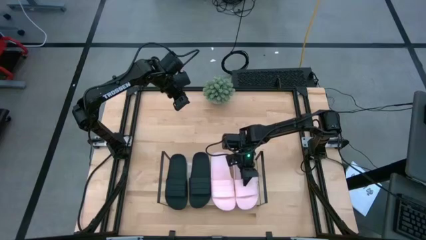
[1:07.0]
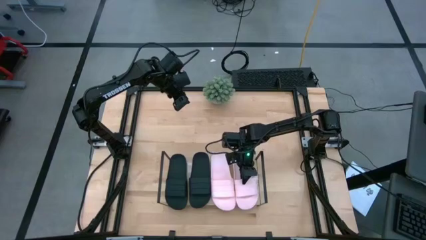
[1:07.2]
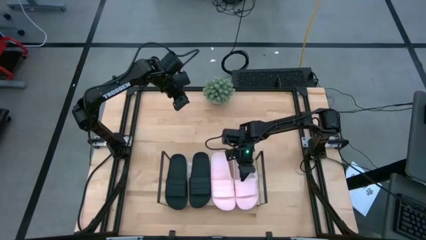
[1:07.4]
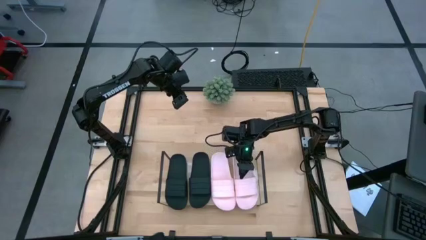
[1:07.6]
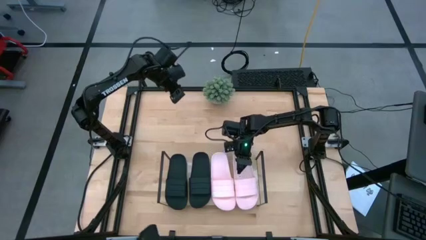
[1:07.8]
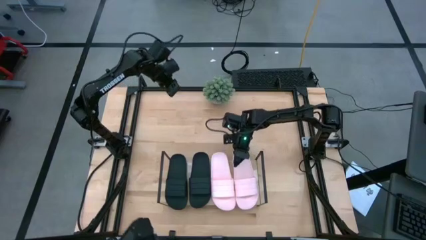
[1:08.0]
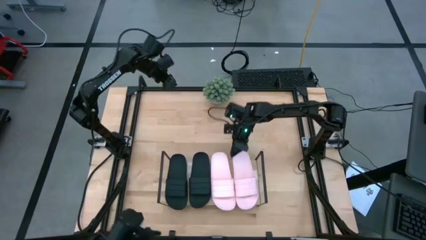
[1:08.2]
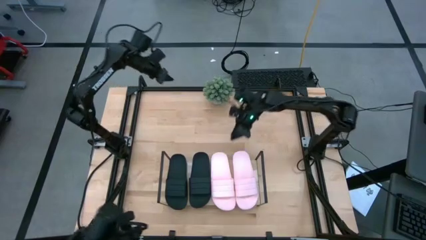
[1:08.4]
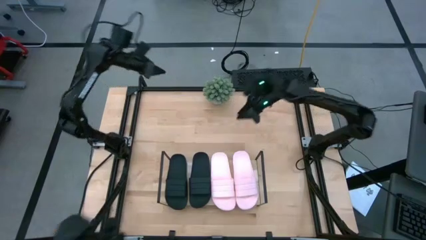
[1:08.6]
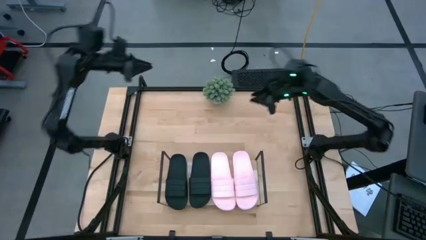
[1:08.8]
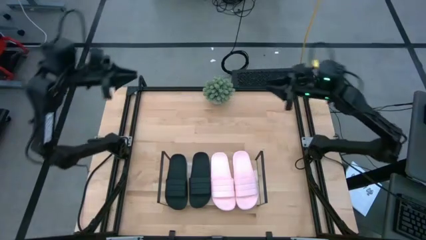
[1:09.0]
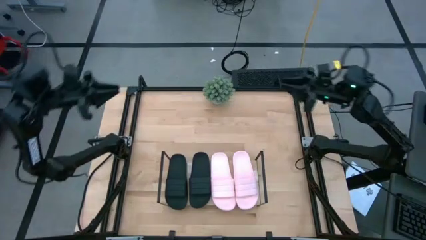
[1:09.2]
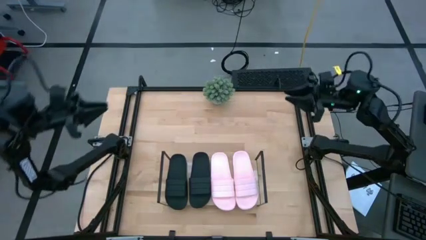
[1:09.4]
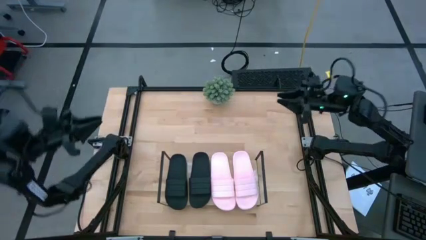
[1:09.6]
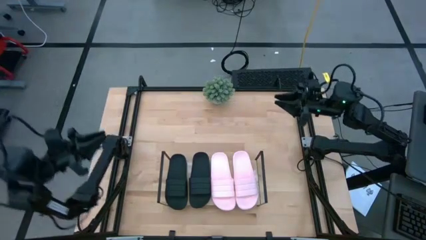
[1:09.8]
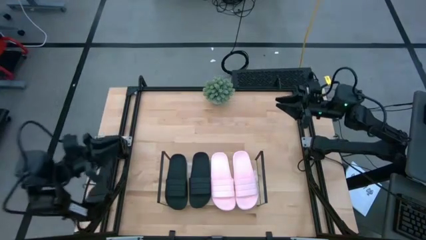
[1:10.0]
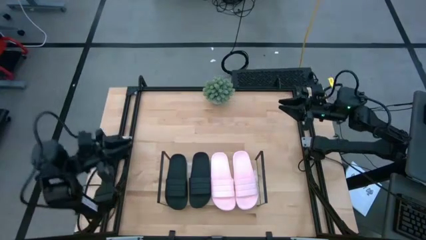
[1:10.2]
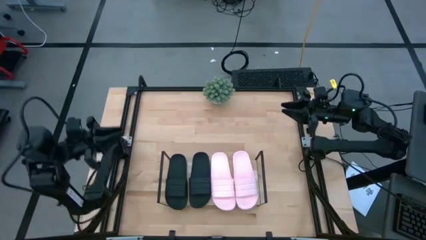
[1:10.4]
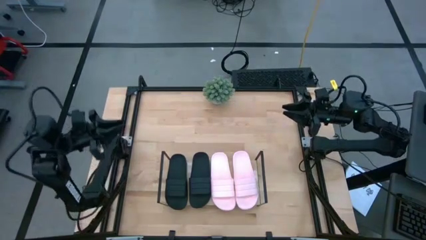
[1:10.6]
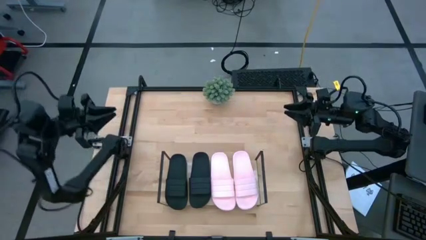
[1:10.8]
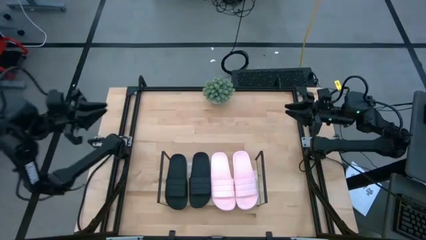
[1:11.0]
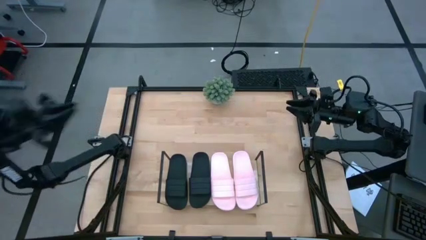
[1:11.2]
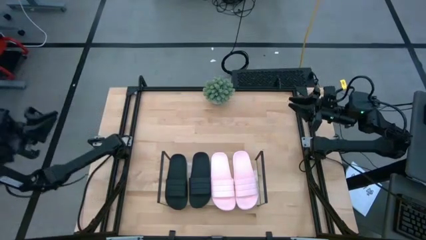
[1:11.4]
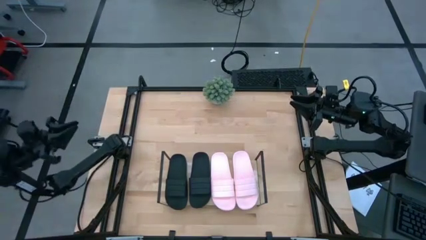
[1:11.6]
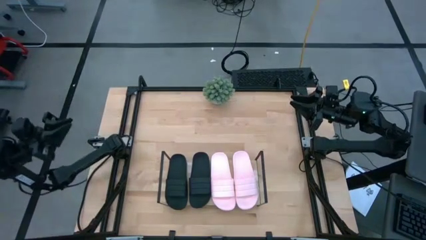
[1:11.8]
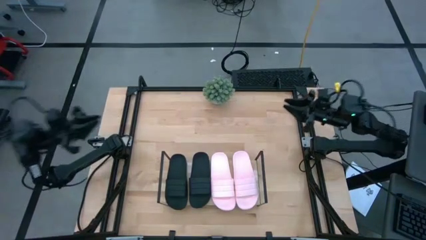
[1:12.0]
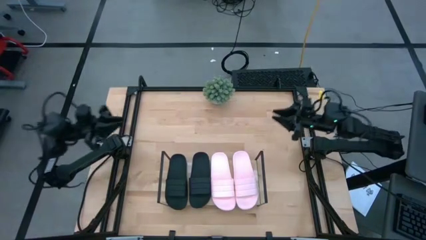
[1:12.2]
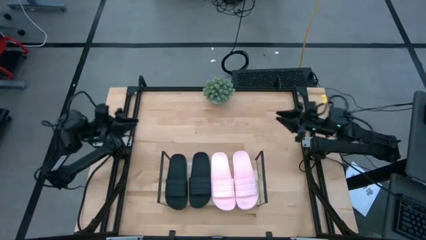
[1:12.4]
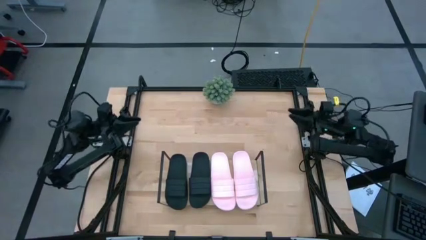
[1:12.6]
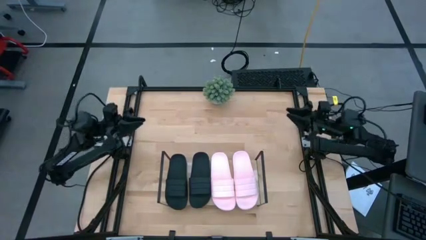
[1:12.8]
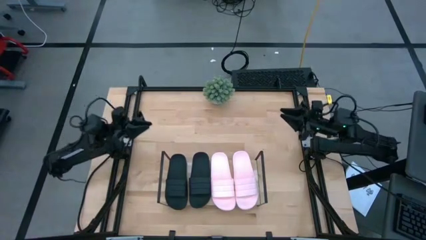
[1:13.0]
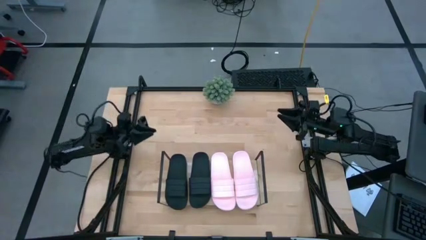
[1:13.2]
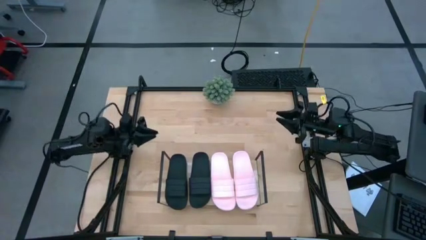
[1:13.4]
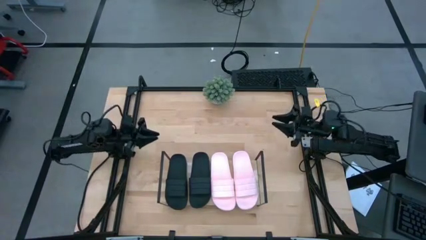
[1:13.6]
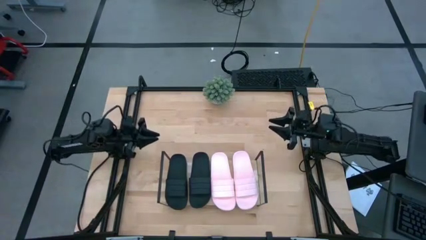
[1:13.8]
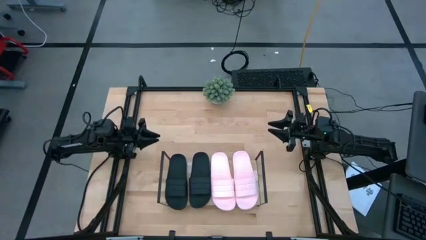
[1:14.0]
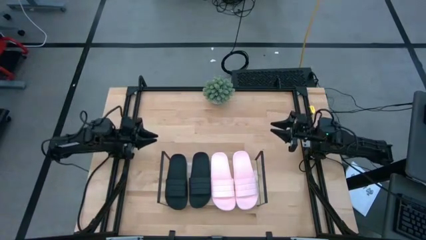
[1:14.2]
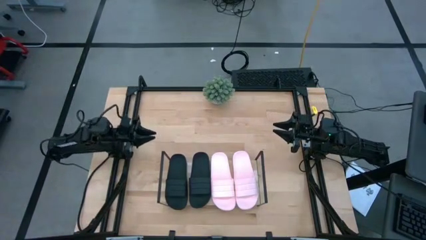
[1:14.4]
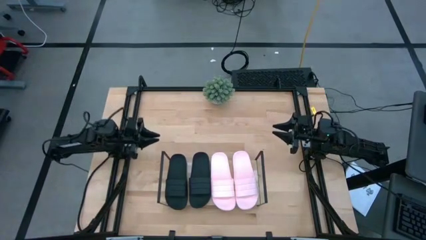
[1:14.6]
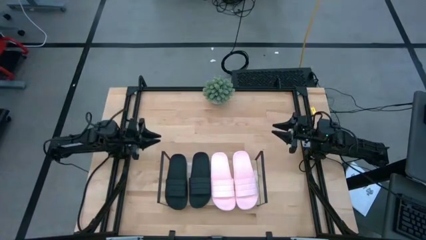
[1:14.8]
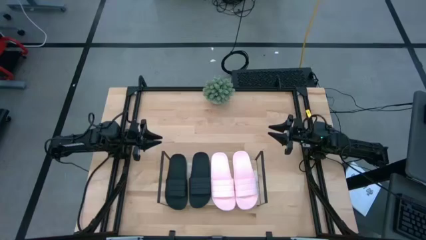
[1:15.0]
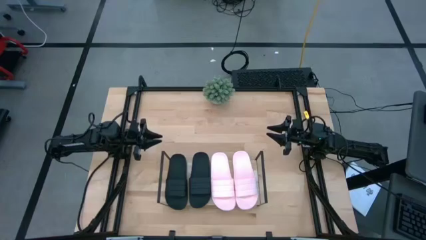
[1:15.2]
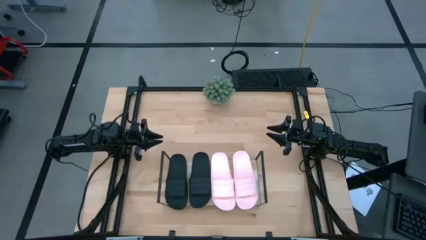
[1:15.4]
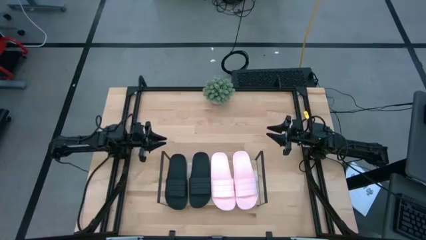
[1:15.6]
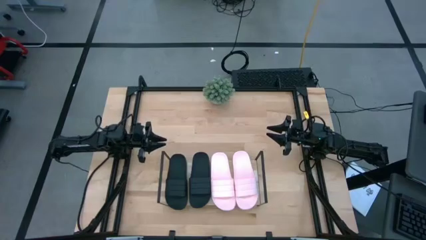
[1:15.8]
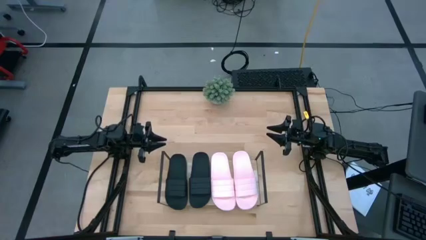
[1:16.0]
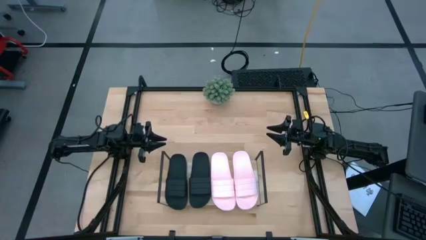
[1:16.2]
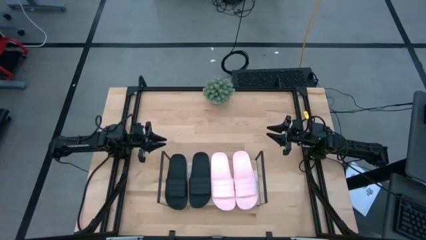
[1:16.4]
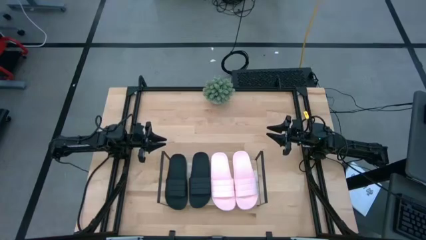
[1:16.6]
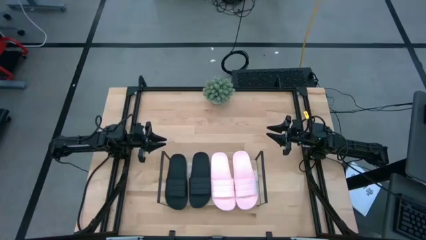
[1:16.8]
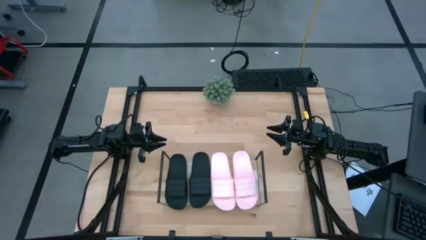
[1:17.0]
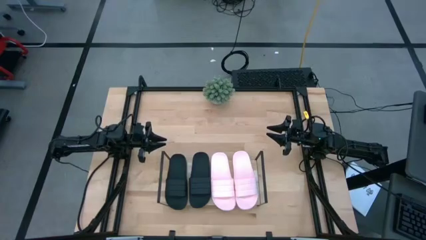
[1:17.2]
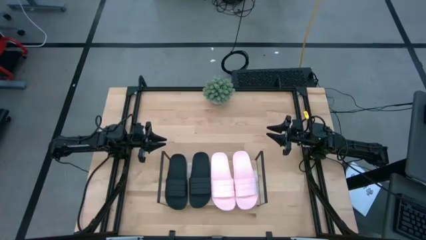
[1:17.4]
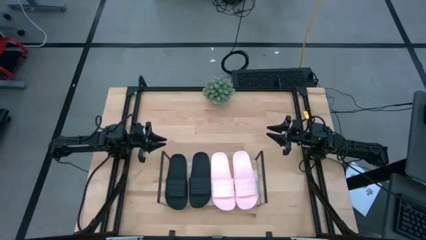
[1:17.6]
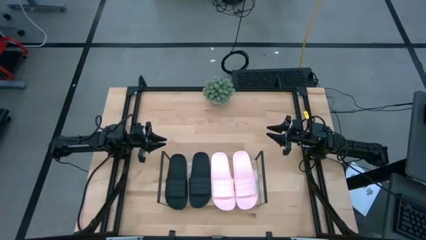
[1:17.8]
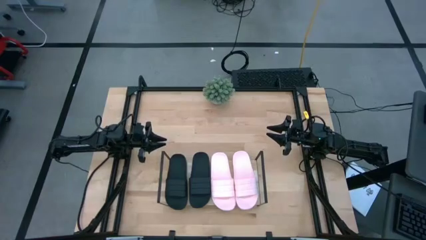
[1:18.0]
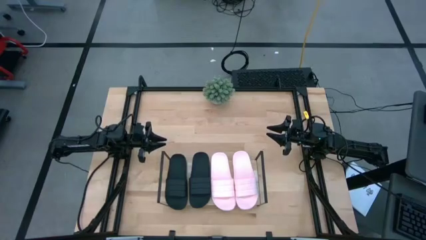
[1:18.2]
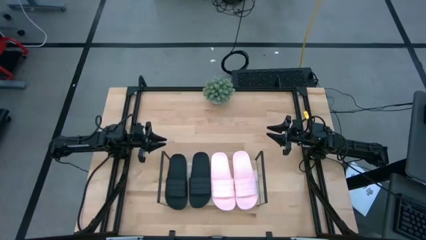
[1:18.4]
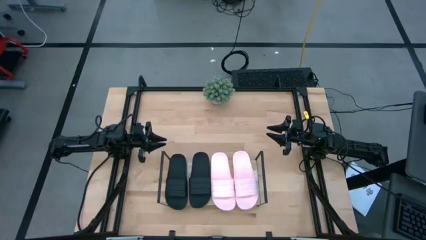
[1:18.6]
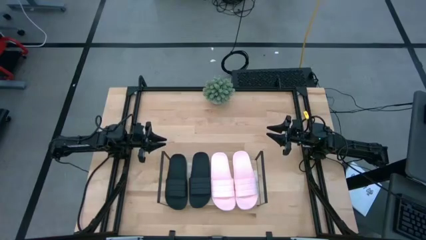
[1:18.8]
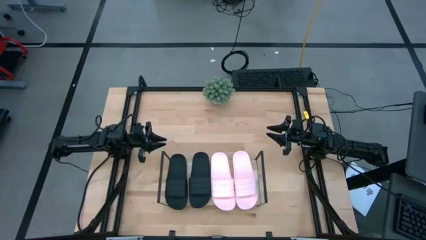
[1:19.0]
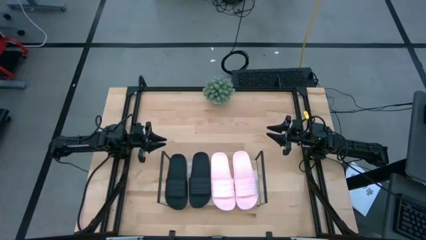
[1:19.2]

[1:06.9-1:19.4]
Task: Pick and place slides into the shelf
Return to Home Position
